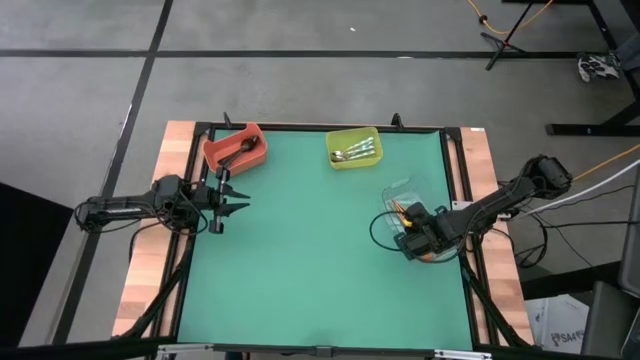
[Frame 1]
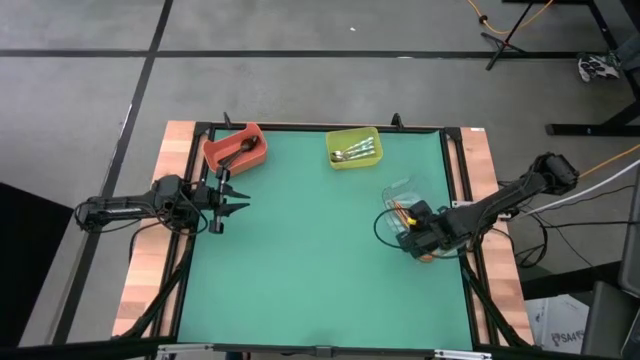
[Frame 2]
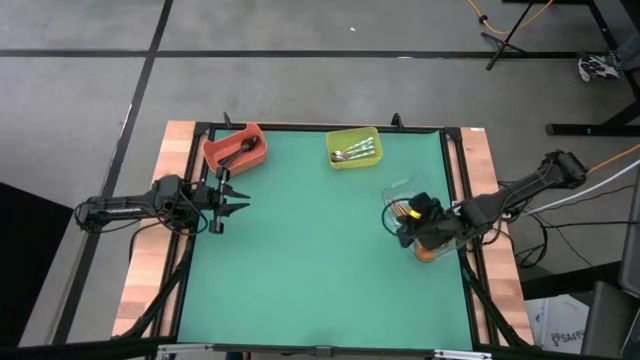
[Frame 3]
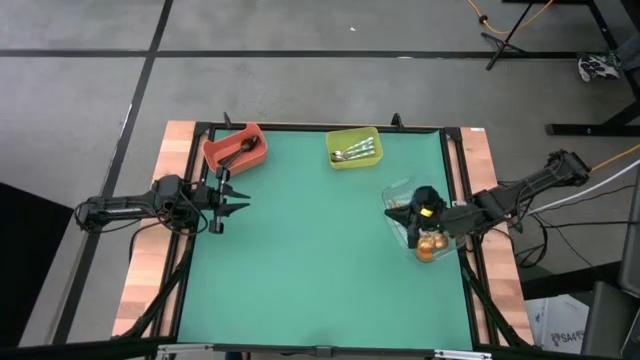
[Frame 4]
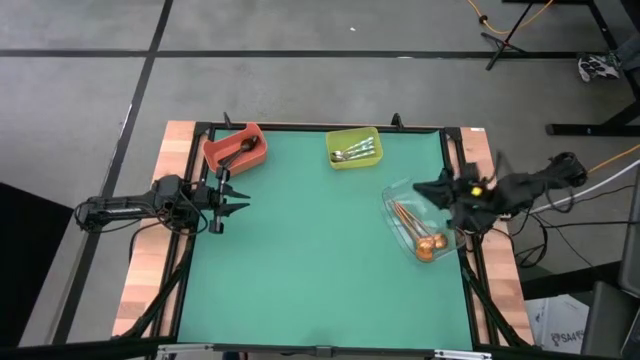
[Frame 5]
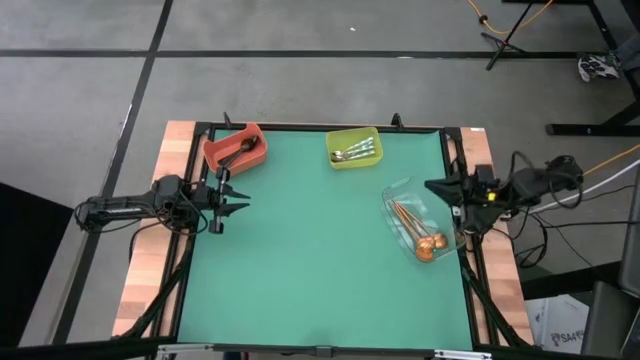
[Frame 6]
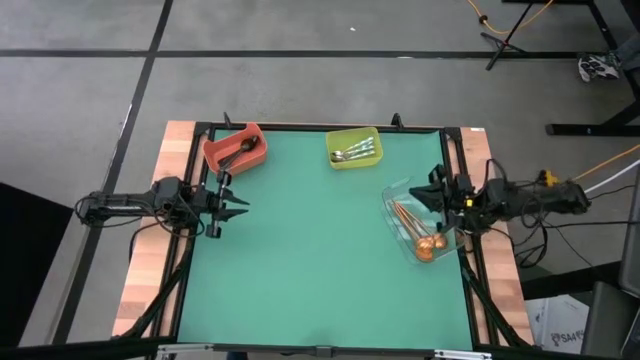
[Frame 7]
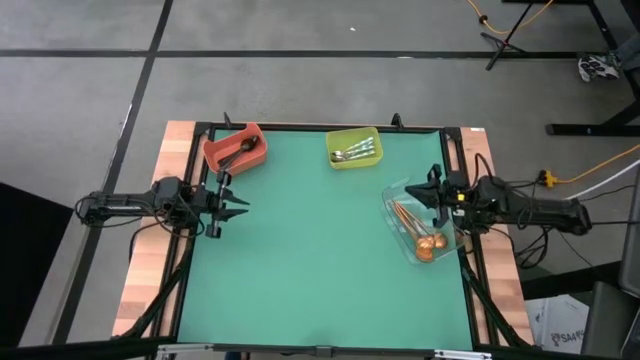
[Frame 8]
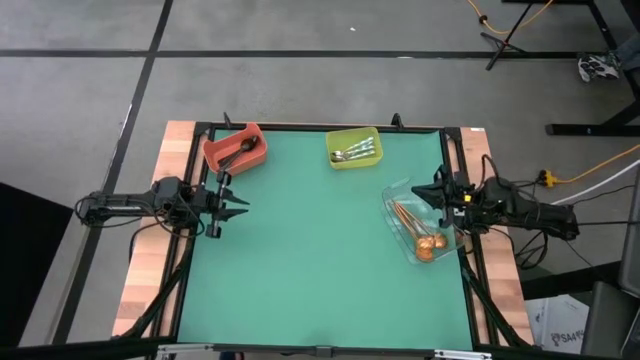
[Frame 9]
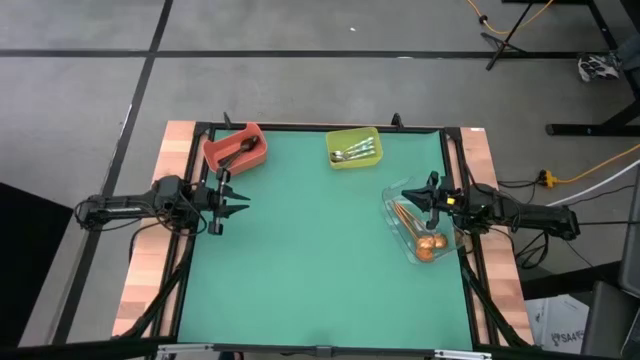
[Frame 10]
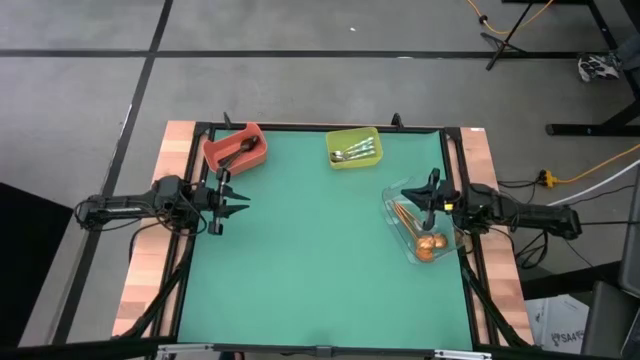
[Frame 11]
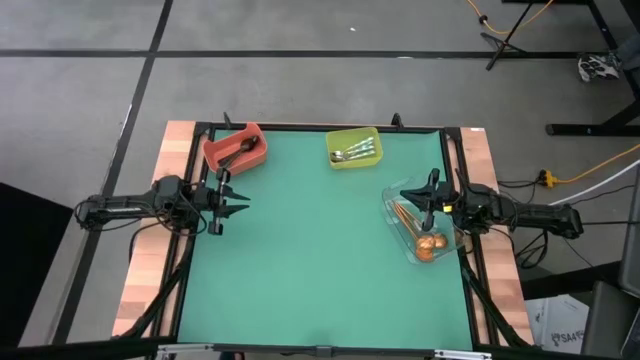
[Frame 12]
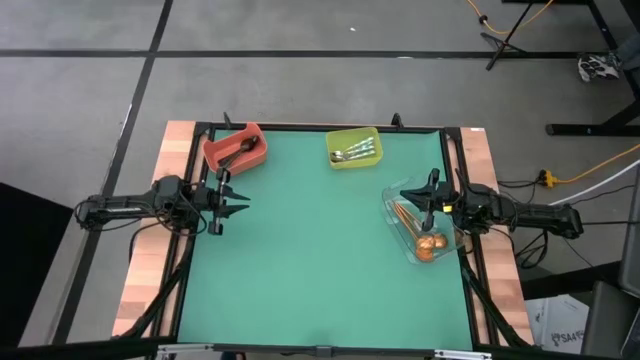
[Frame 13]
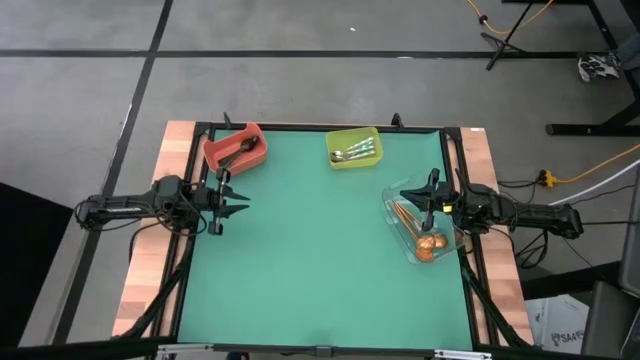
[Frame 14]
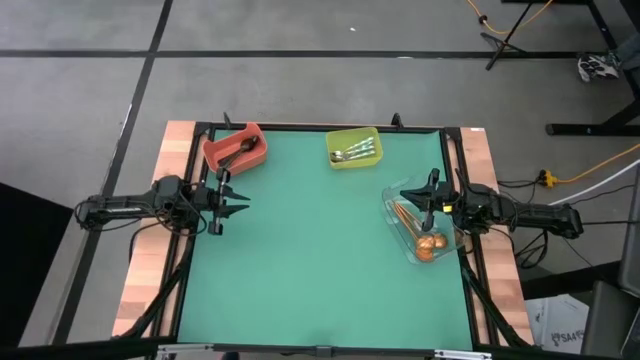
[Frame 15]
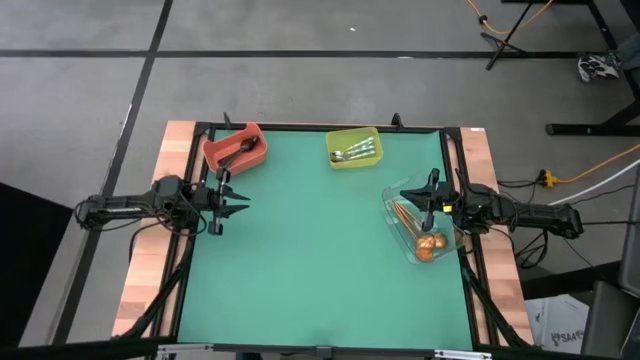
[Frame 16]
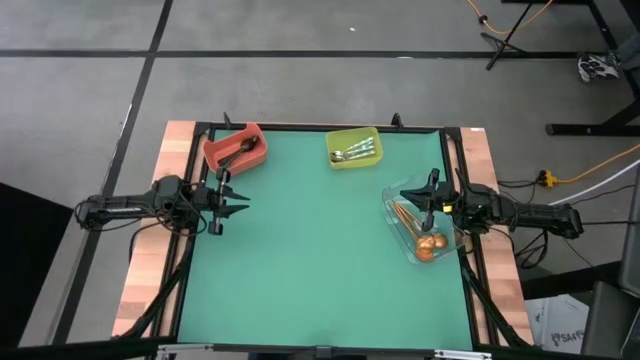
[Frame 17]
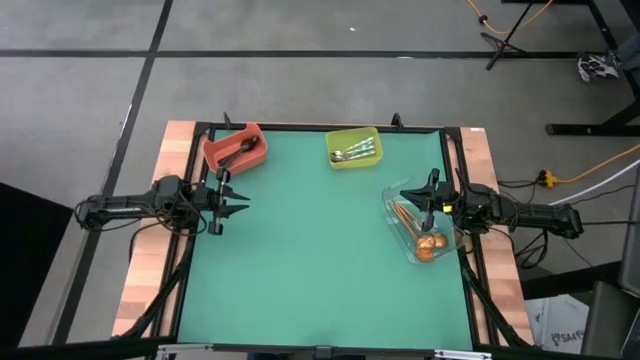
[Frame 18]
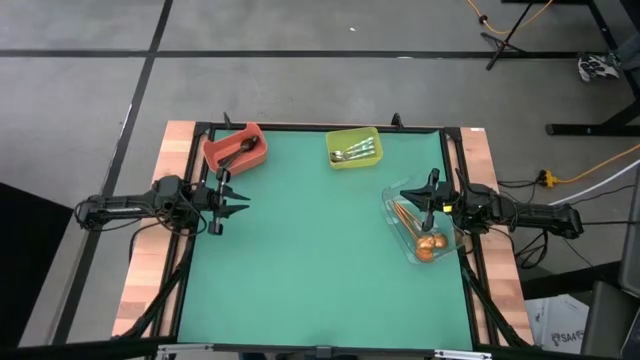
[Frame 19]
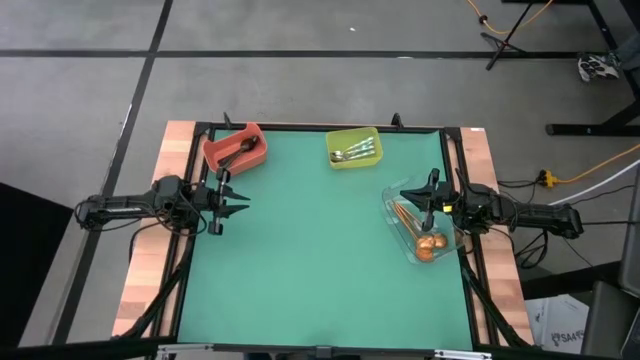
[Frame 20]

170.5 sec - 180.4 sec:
Task: Sort silverware by color (type)
Return to Home Position

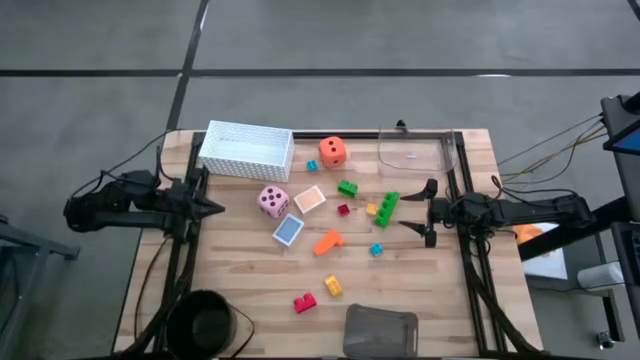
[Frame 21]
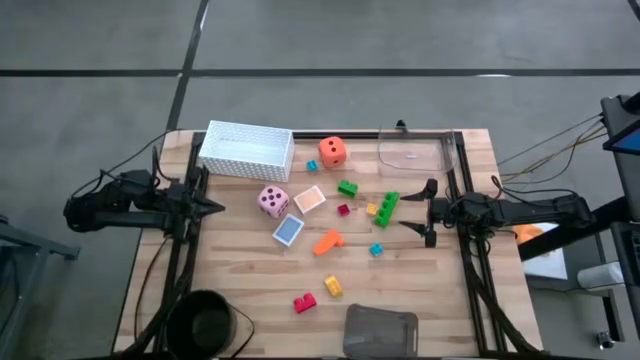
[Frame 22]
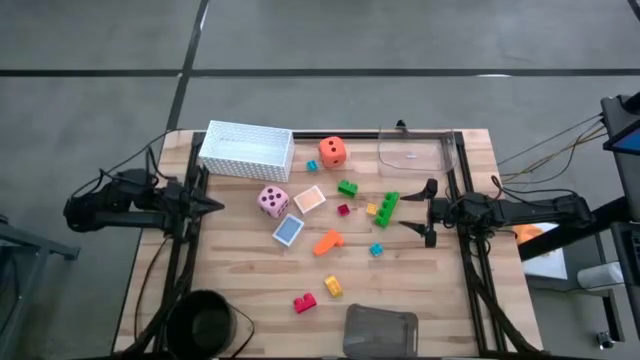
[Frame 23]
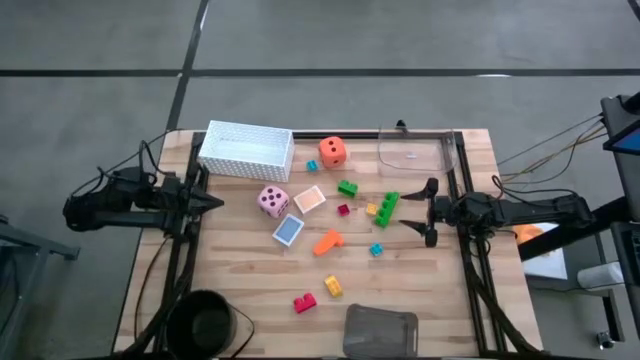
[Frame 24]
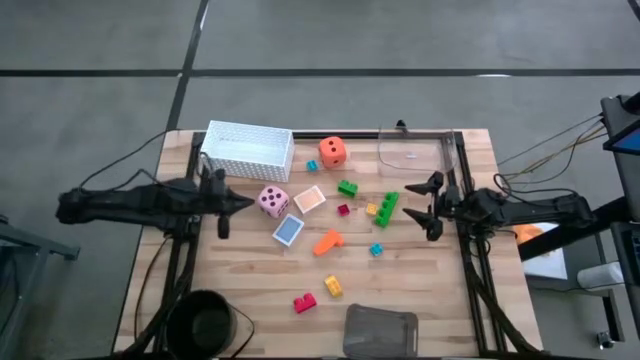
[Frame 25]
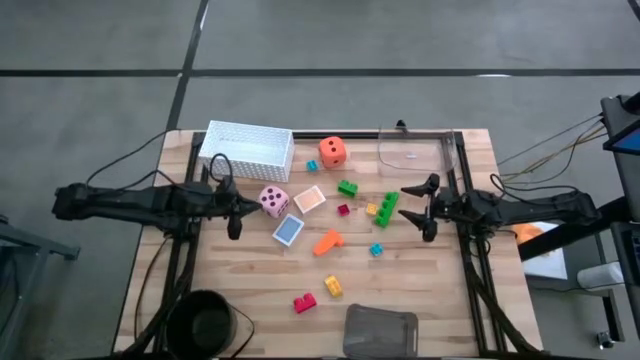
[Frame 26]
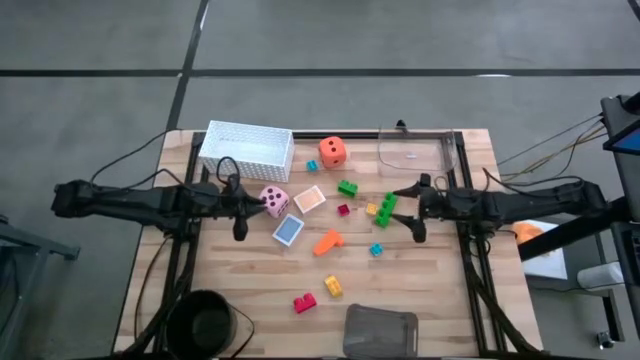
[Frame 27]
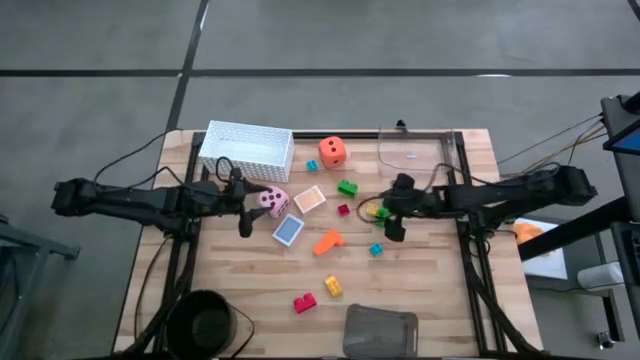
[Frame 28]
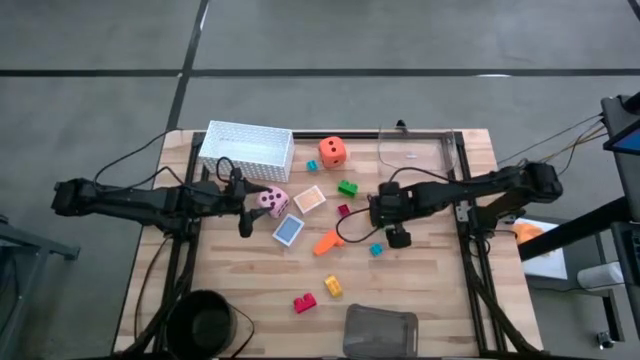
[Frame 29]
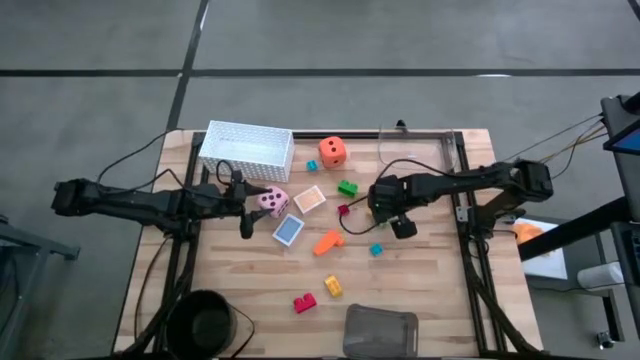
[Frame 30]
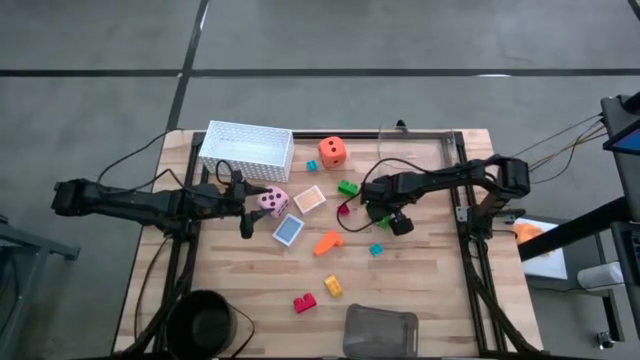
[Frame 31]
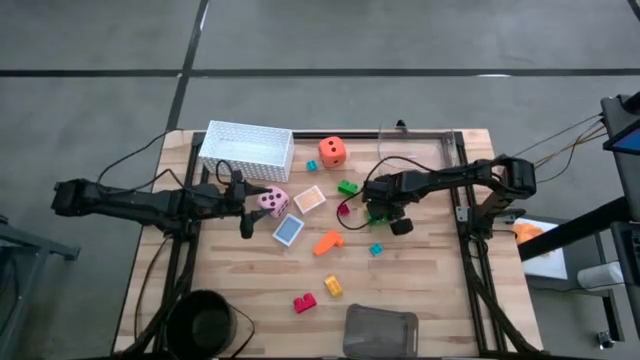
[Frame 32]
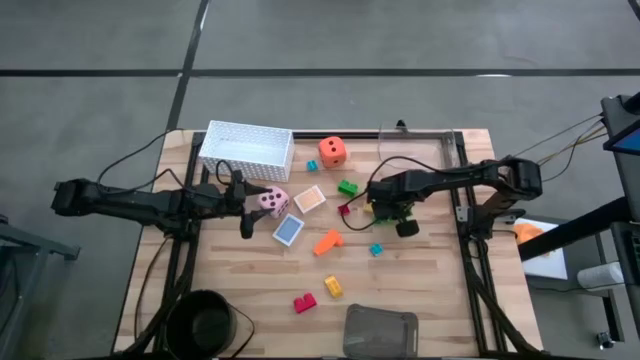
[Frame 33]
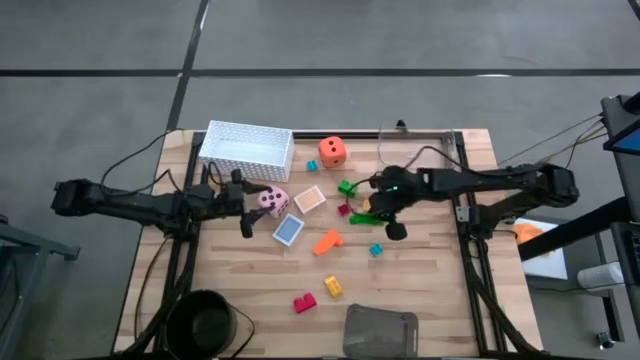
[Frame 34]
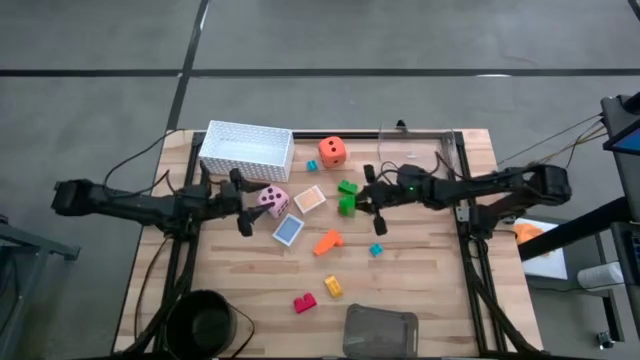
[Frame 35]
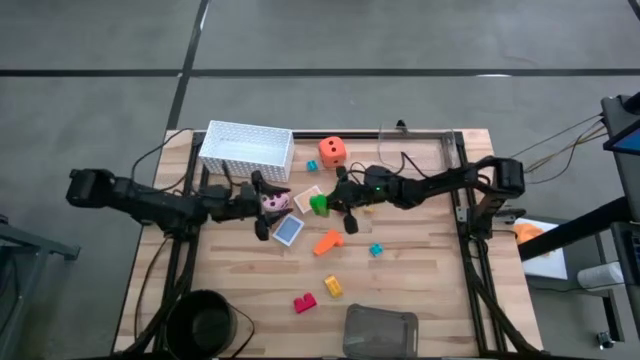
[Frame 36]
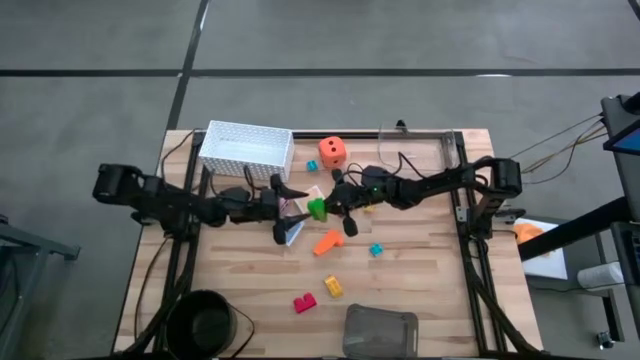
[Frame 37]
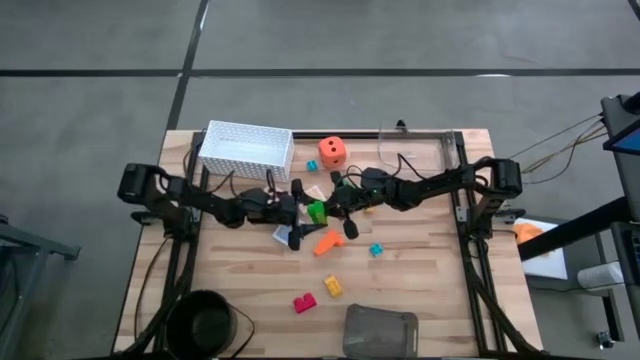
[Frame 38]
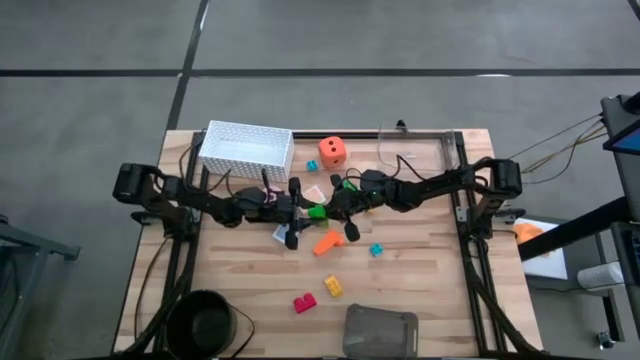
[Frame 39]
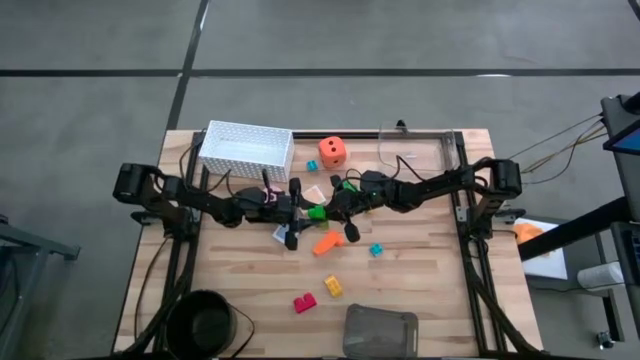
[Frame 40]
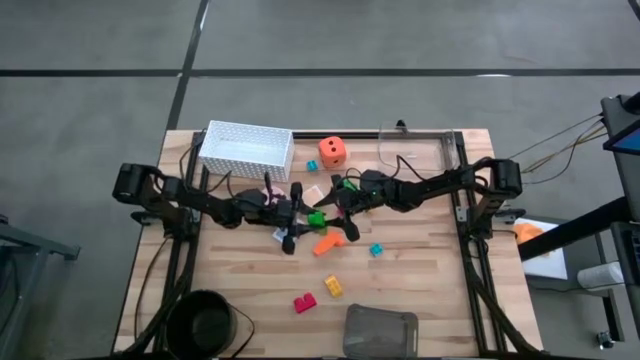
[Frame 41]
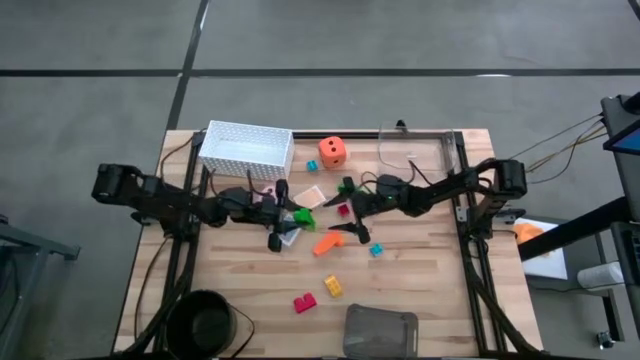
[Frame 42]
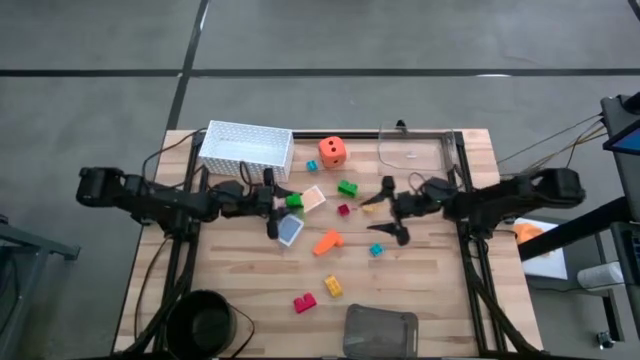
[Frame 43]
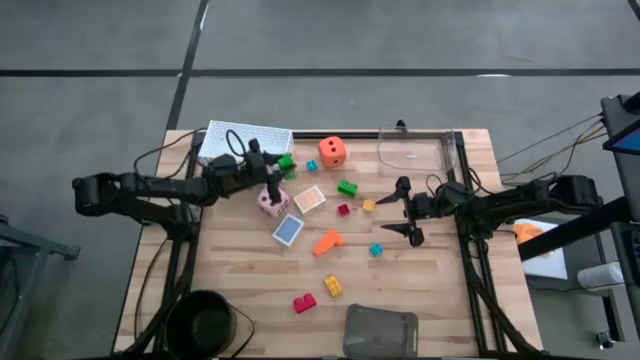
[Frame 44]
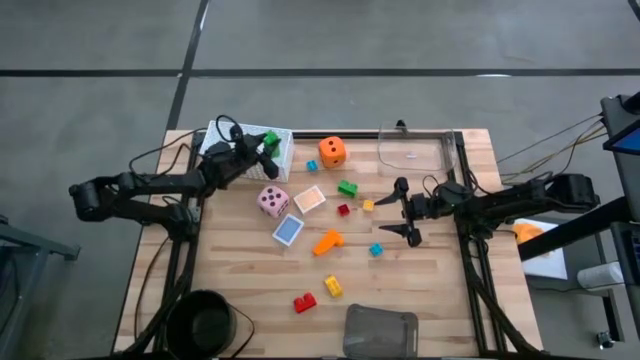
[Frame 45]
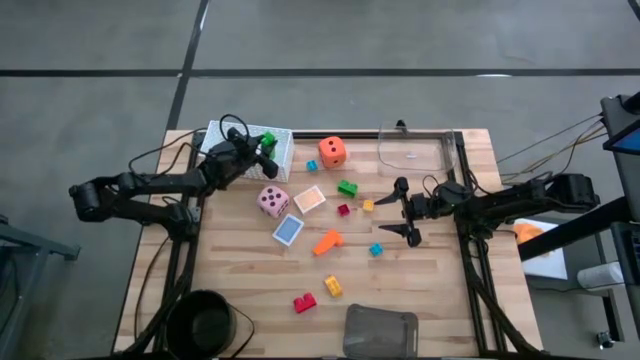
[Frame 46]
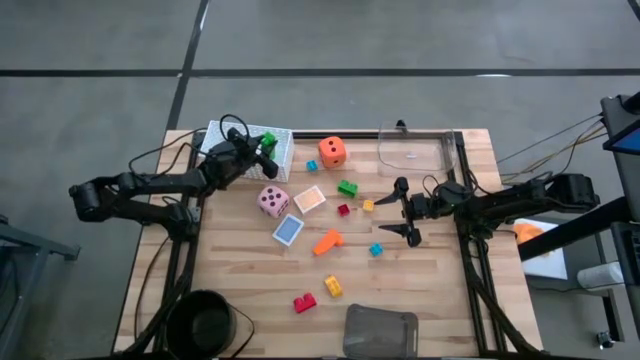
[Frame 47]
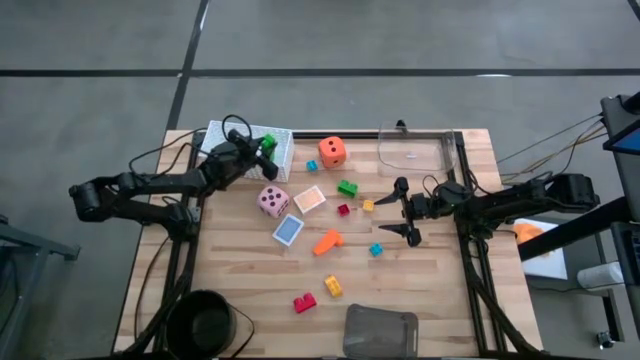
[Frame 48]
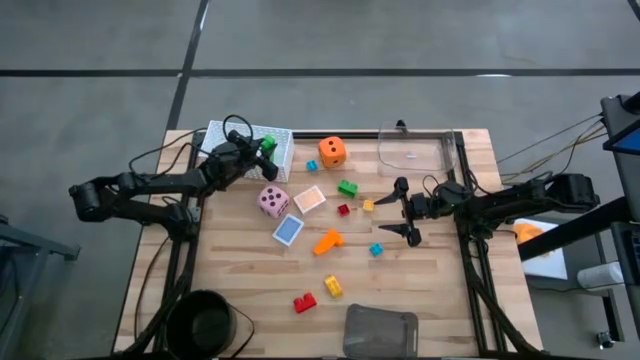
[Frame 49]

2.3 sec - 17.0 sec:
Task: Pick & Place Toys
Put the right large green game piece into the white bin
